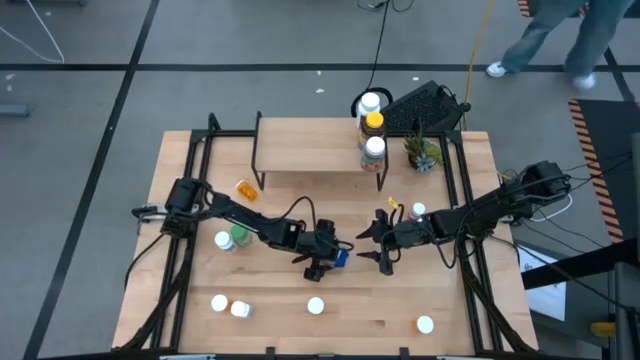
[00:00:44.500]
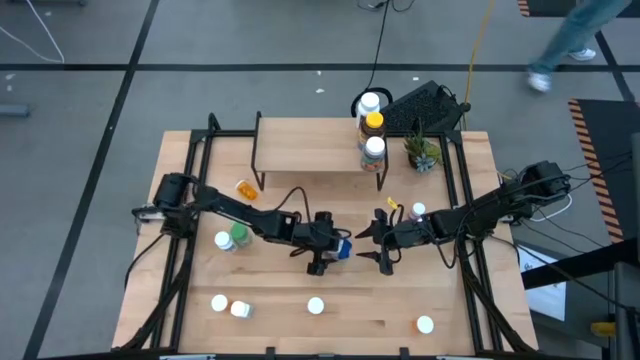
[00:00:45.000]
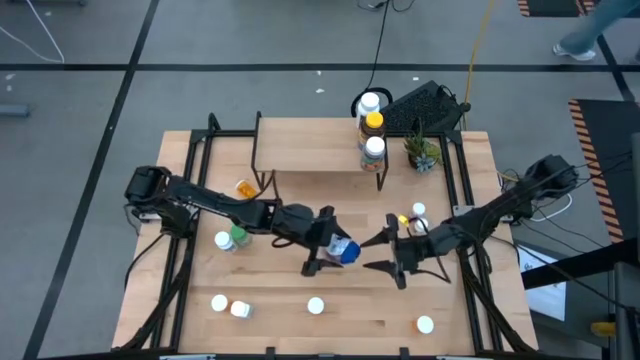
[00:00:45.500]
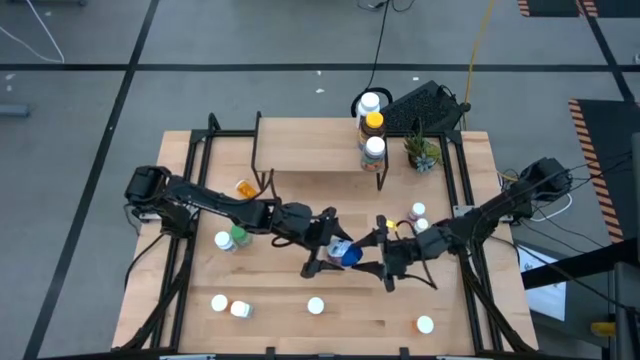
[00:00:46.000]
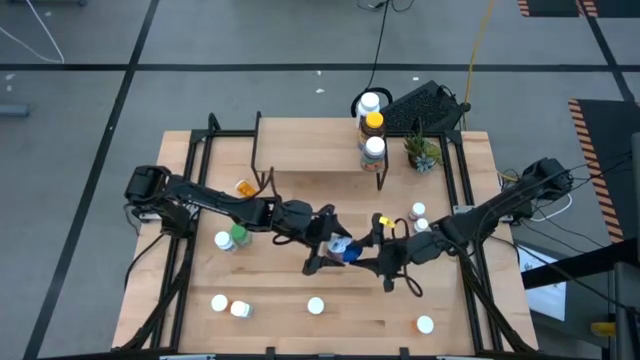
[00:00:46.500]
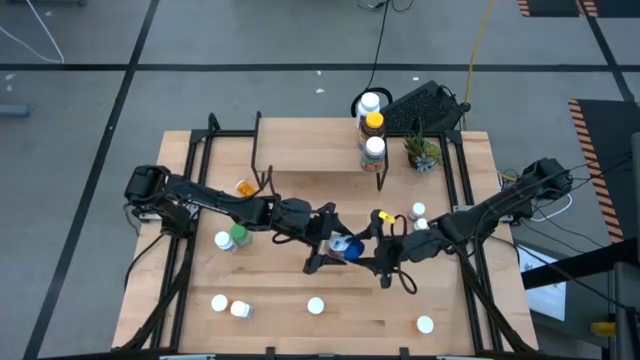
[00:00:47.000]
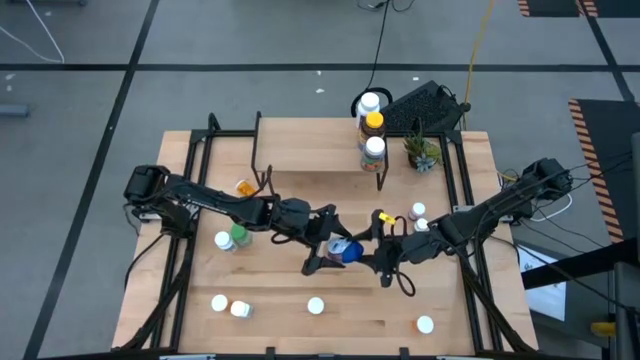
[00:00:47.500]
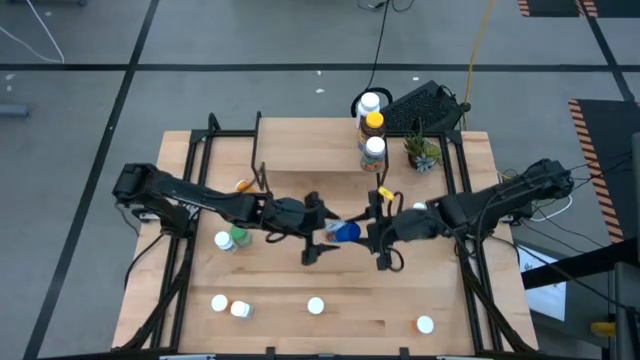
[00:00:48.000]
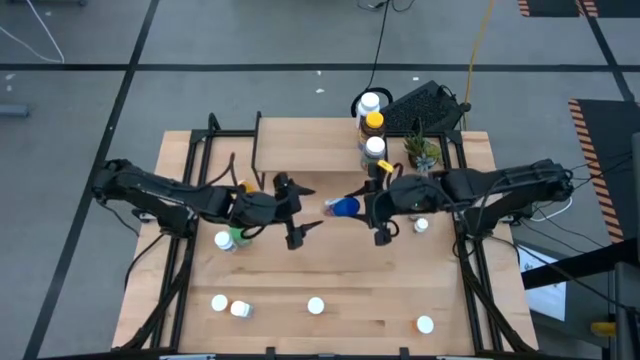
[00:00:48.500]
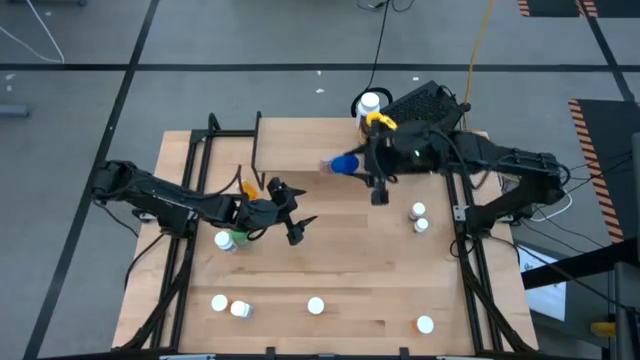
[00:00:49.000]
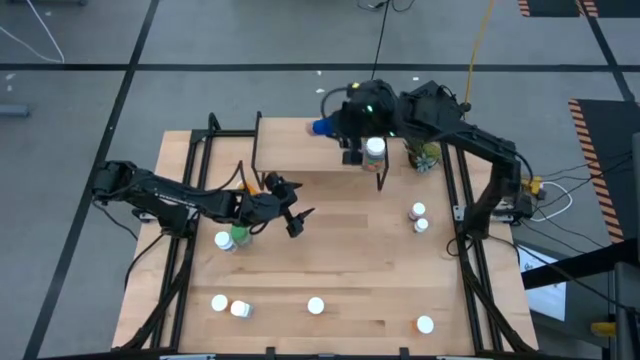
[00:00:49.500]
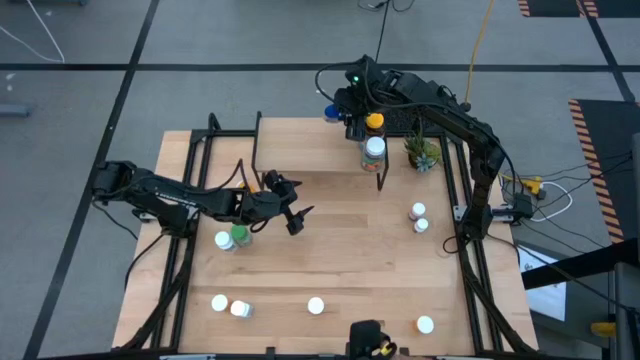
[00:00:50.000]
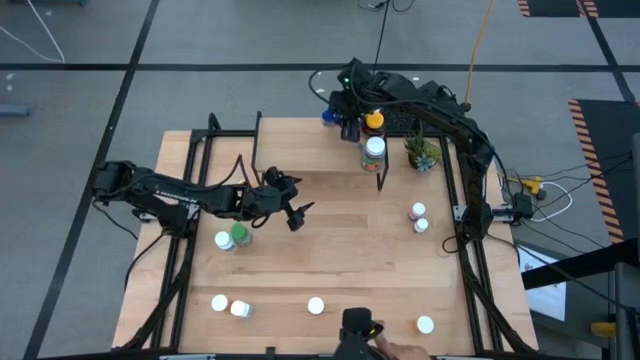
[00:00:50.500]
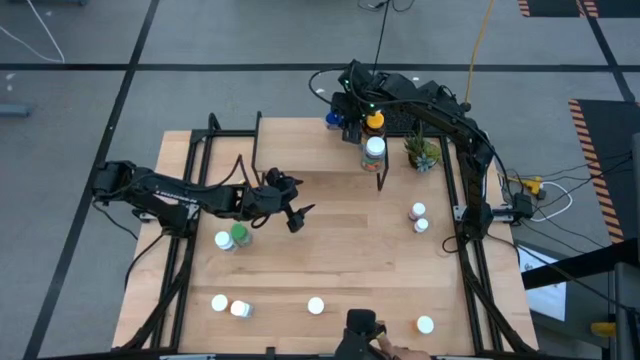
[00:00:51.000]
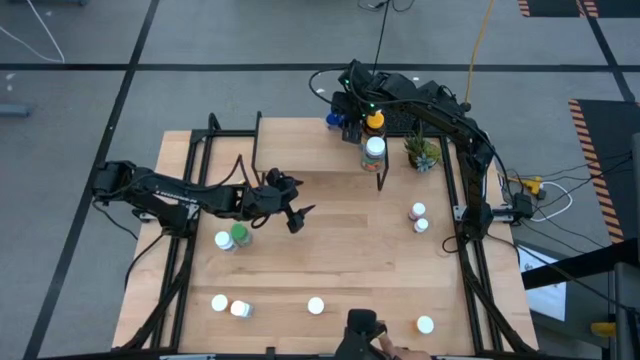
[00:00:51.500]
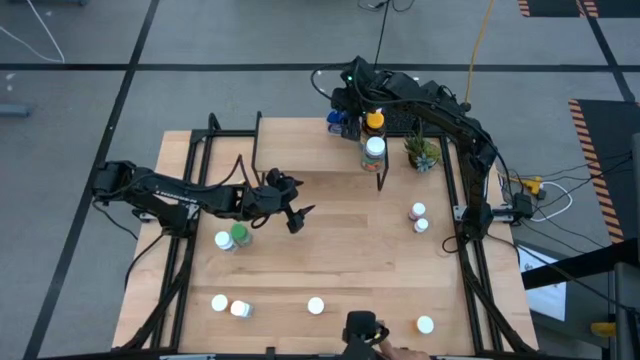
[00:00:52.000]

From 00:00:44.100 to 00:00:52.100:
Task: Pick and place medicine bottles onto shelf by color
Put the blue pill bottle on the shelf

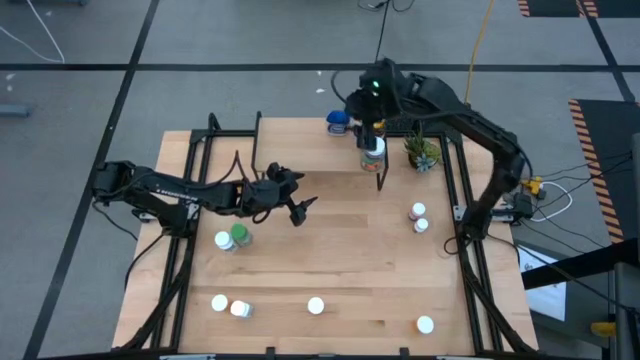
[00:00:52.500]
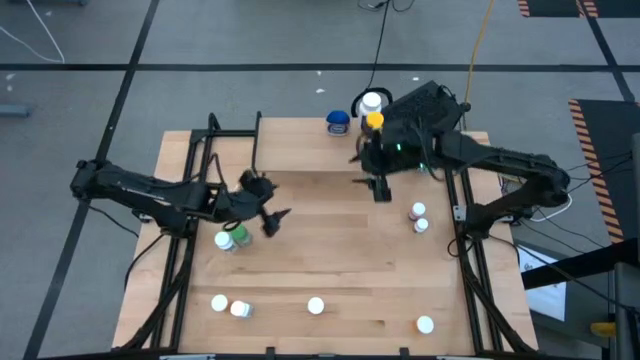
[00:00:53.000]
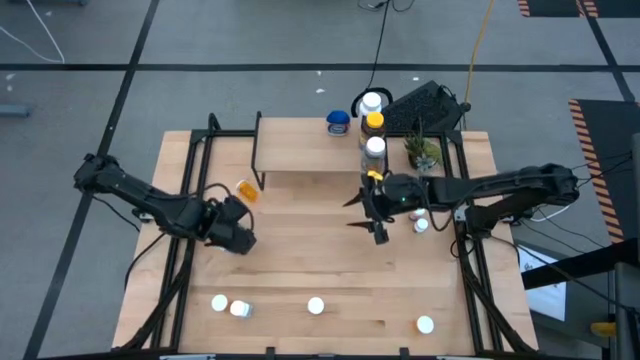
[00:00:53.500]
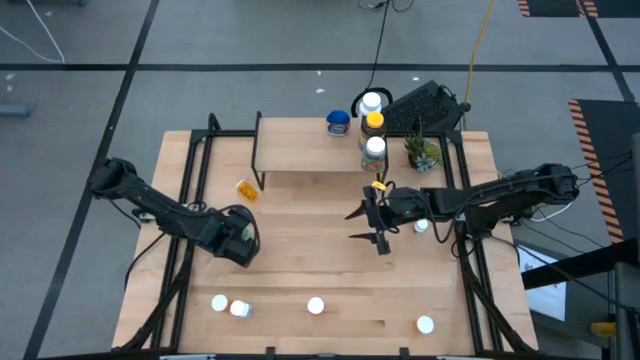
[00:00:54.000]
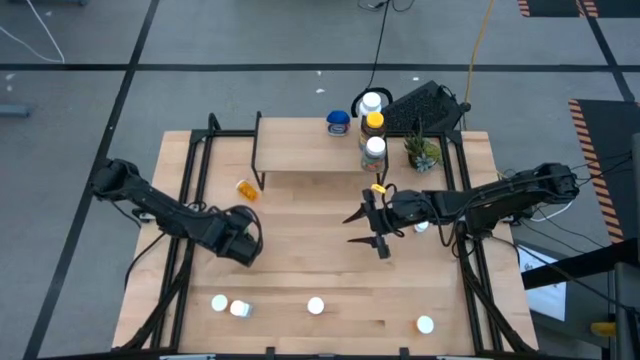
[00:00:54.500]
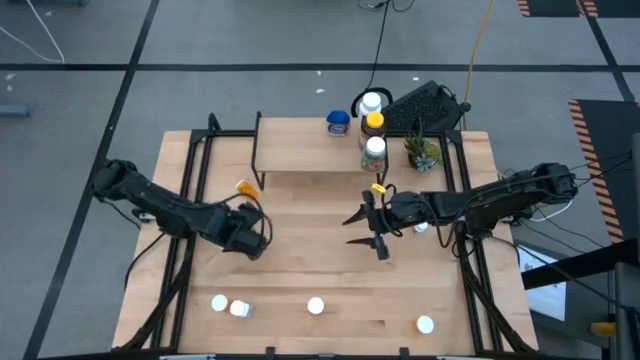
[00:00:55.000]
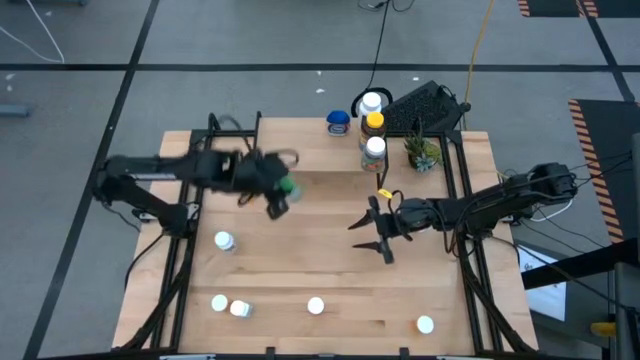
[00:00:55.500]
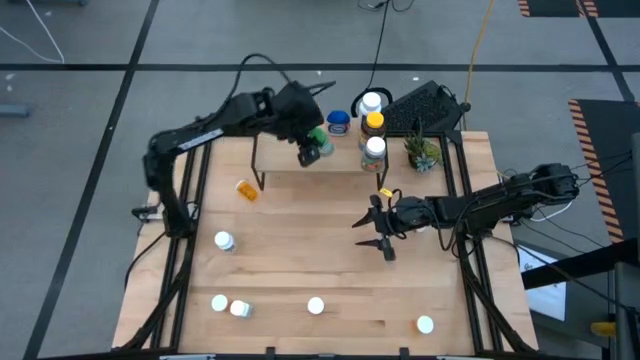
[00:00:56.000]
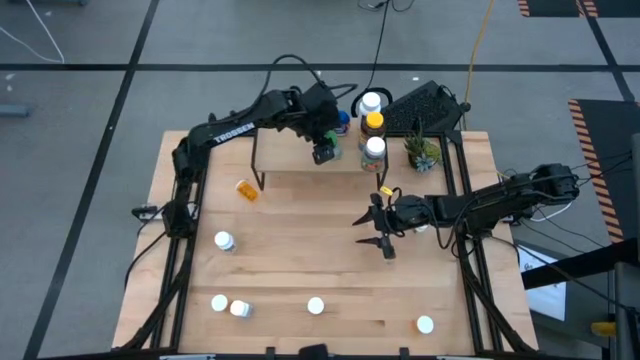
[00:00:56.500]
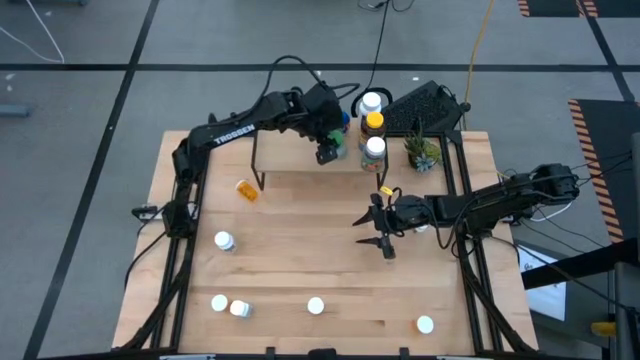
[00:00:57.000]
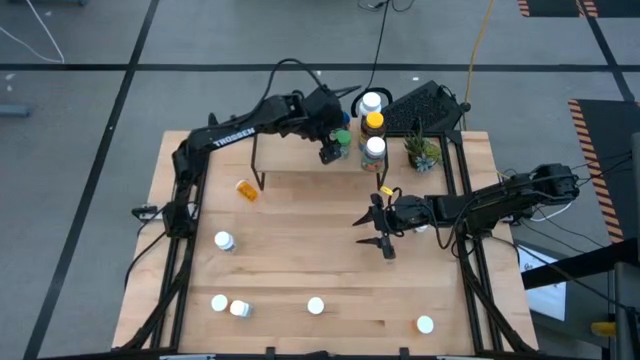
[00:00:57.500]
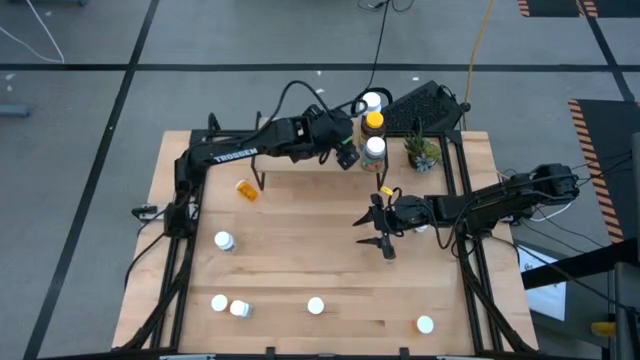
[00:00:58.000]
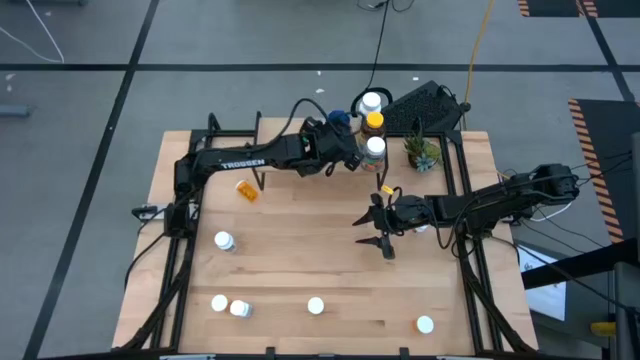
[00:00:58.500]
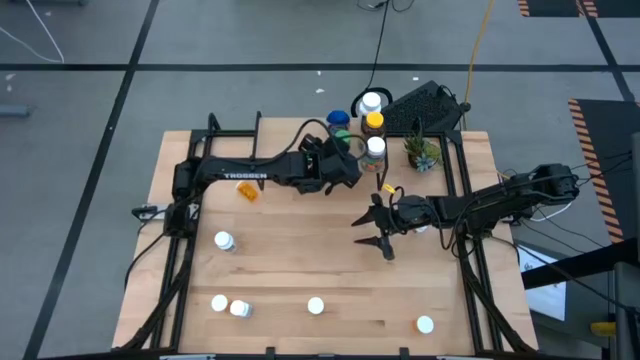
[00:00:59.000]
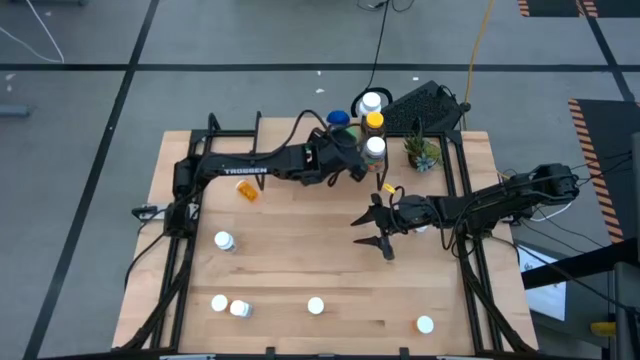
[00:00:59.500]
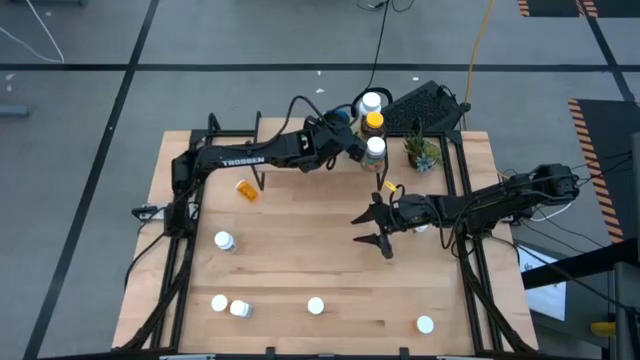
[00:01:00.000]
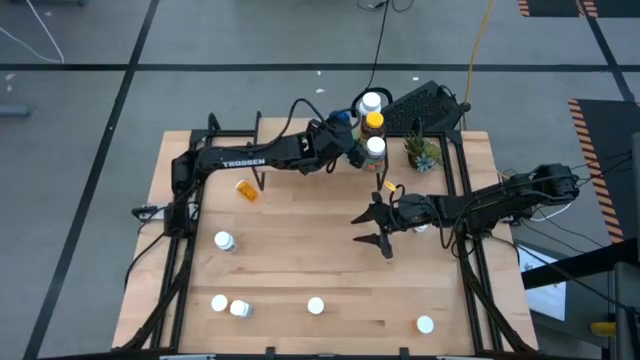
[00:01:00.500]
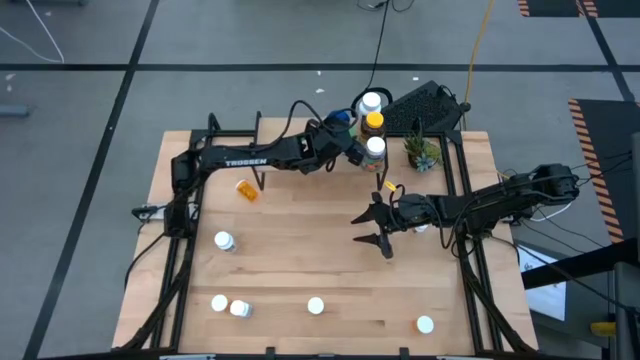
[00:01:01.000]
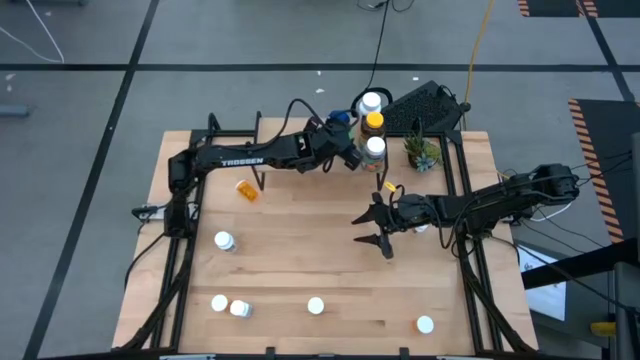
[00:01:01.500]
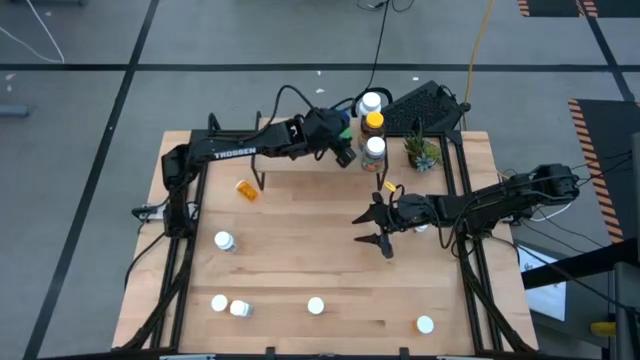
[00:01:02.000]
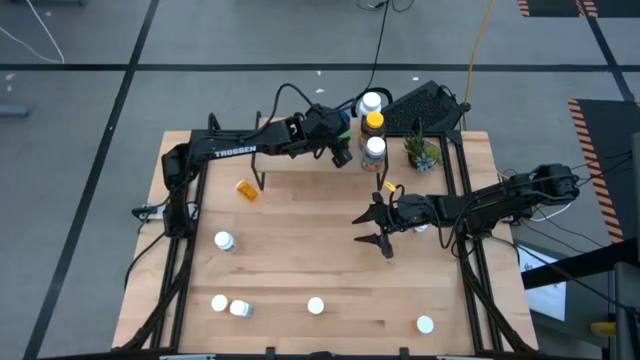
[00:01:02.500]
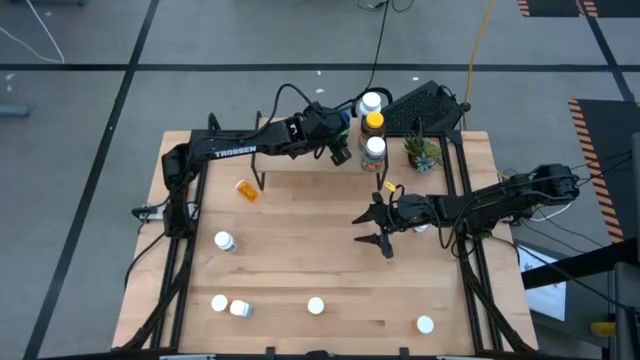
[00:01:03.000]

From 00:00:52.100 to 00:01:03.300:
Put the light green pill bottle on the shelf

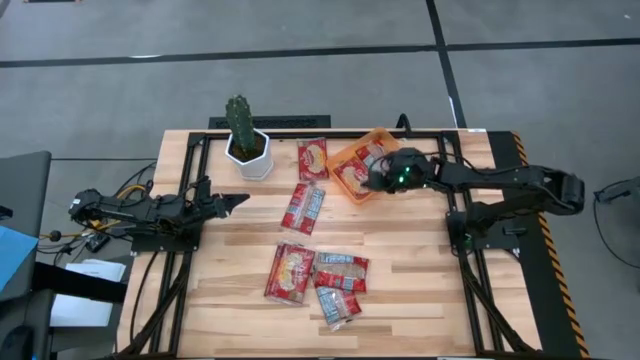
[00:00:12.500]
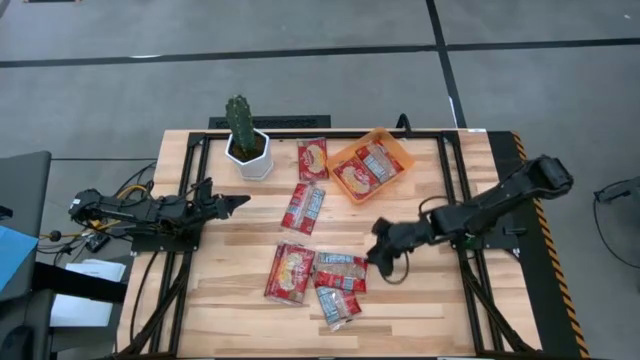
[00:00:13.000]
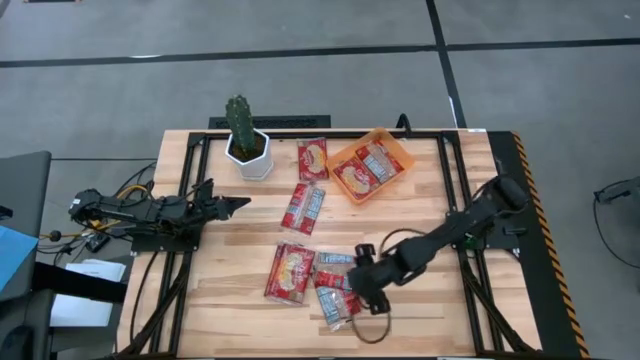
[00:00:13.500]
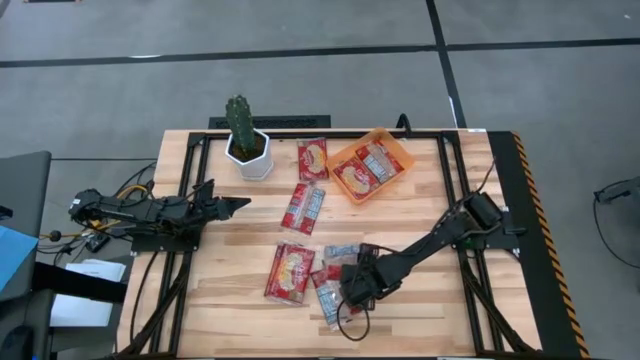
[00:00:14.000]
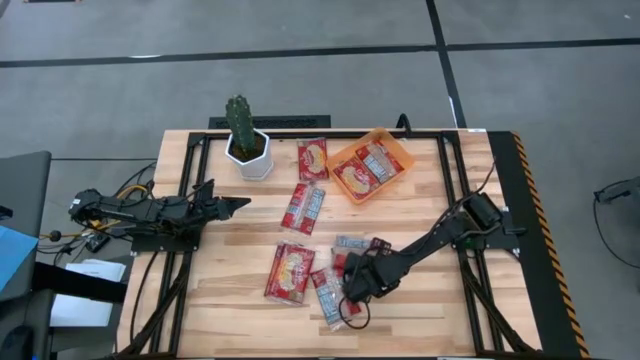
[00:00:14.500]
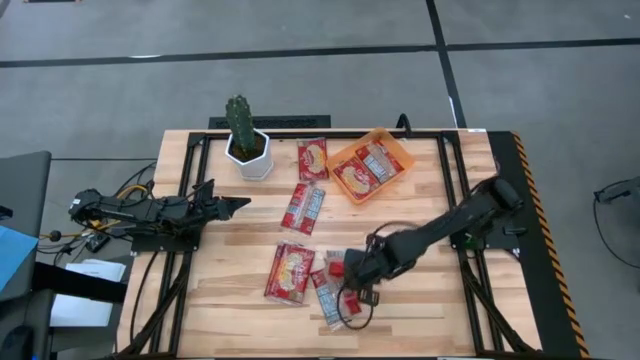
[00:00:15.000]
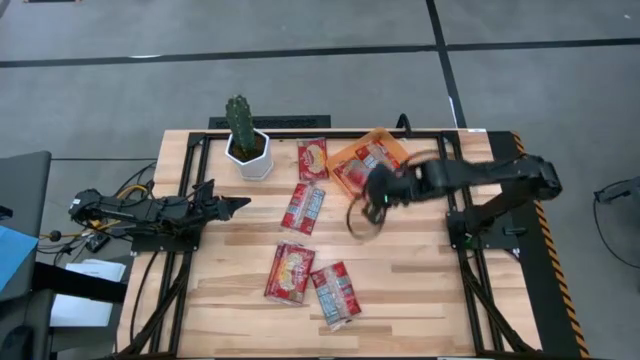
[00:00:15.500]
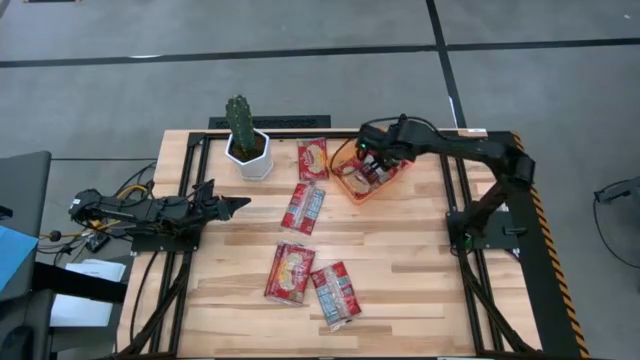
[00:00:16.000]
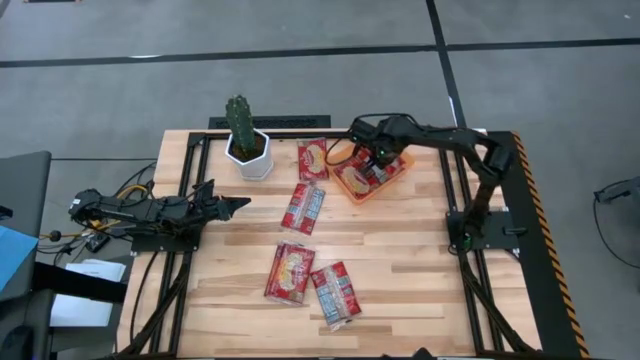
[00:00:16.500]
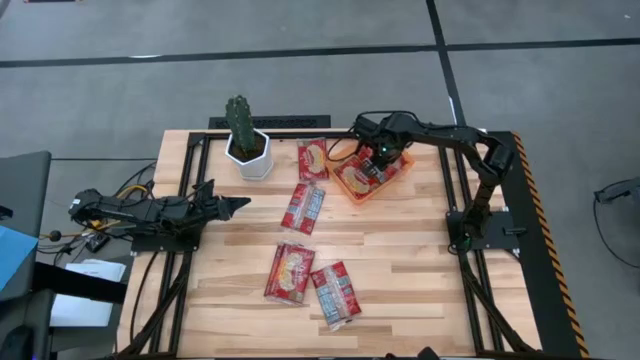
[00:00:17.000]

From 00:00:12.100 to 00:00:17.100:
Task: Sort popcorn bags into baskets
Put the popcorn bag into the orange bin
